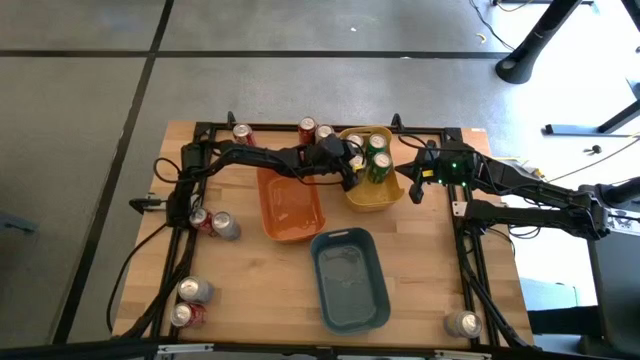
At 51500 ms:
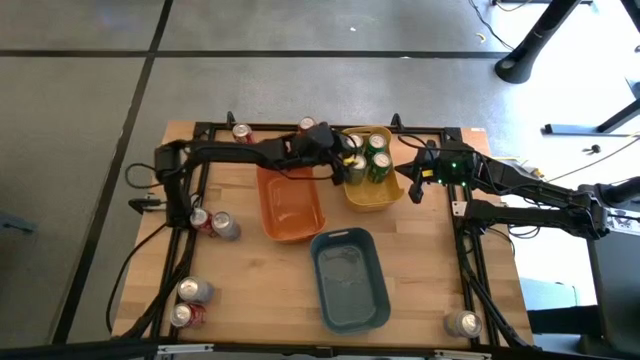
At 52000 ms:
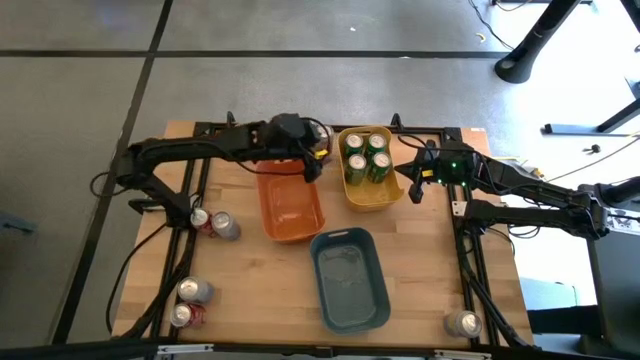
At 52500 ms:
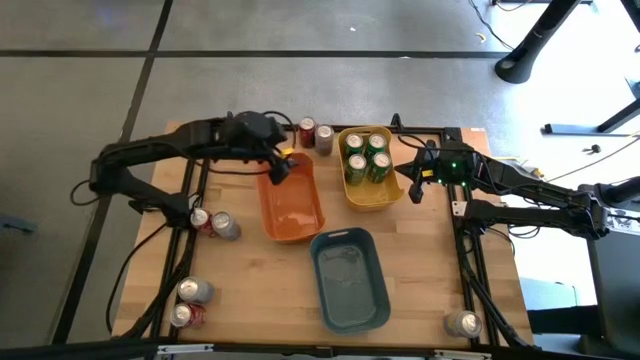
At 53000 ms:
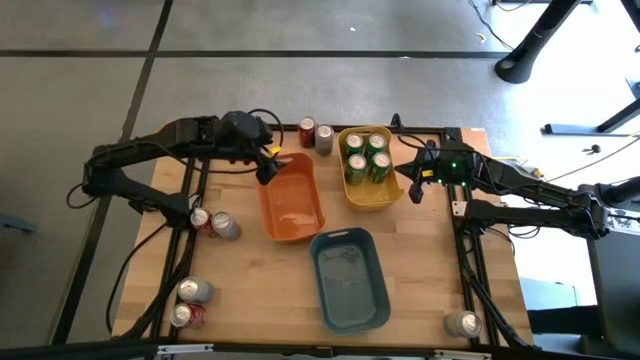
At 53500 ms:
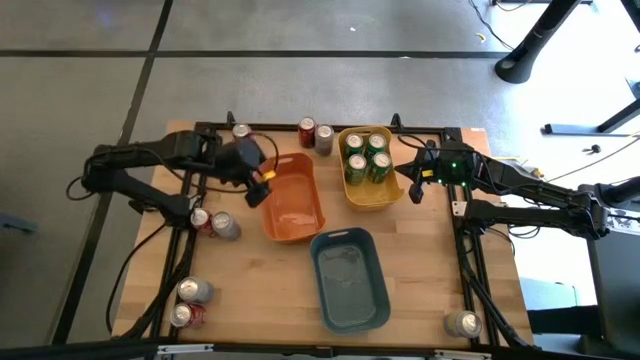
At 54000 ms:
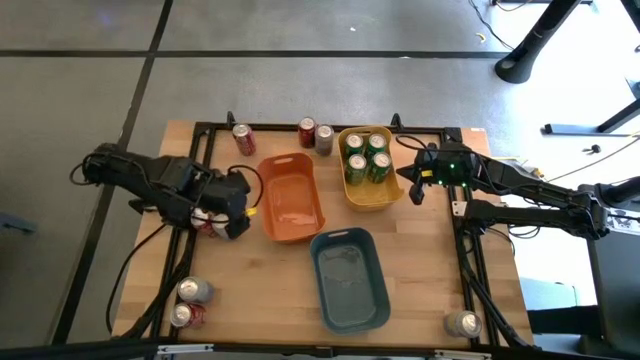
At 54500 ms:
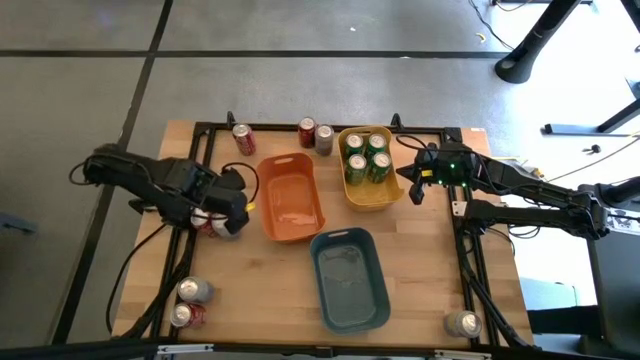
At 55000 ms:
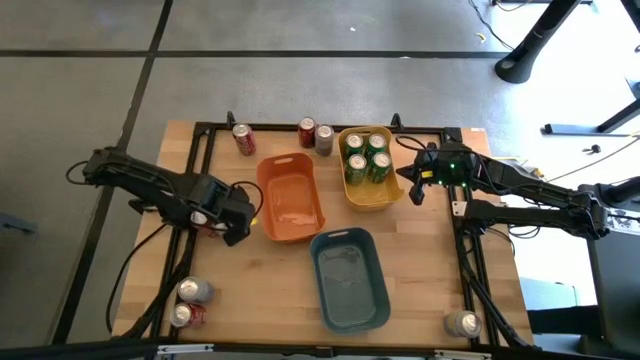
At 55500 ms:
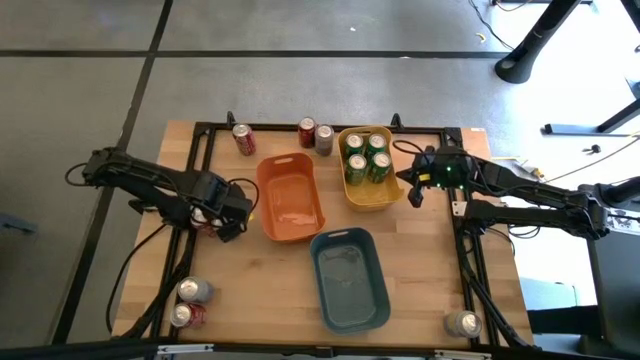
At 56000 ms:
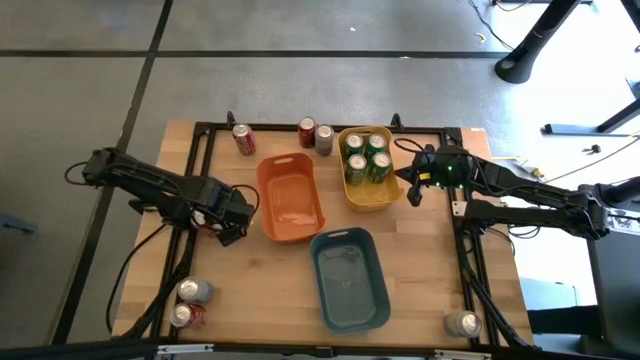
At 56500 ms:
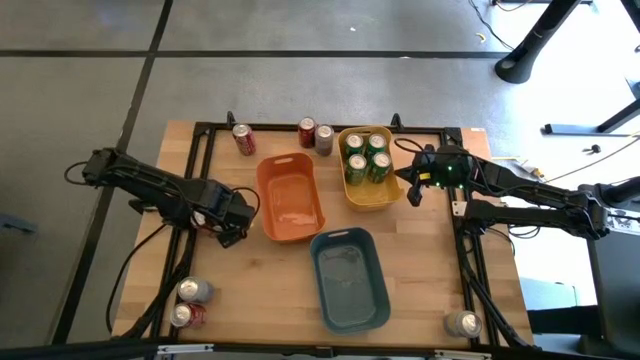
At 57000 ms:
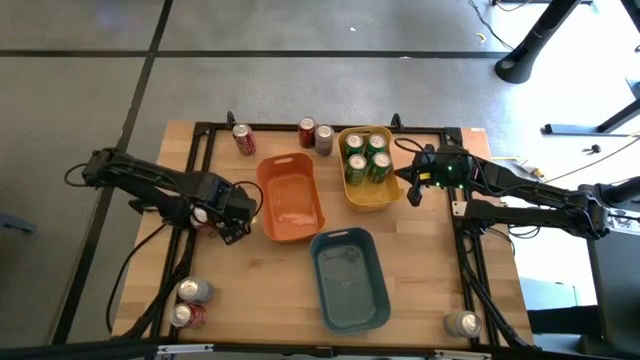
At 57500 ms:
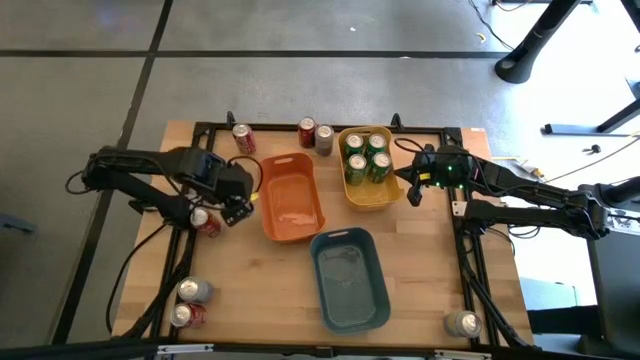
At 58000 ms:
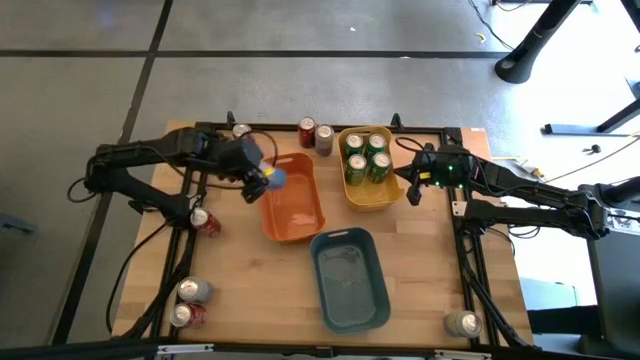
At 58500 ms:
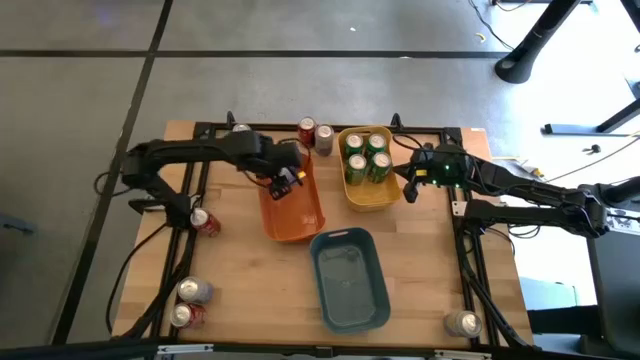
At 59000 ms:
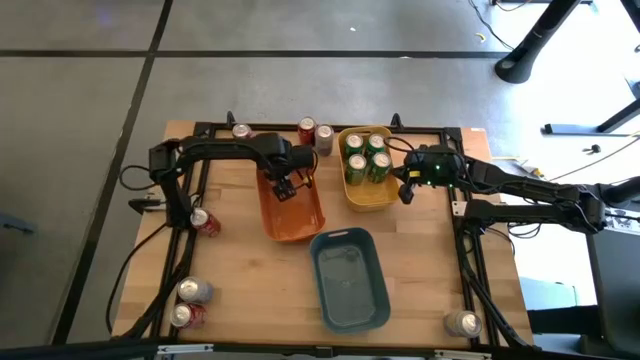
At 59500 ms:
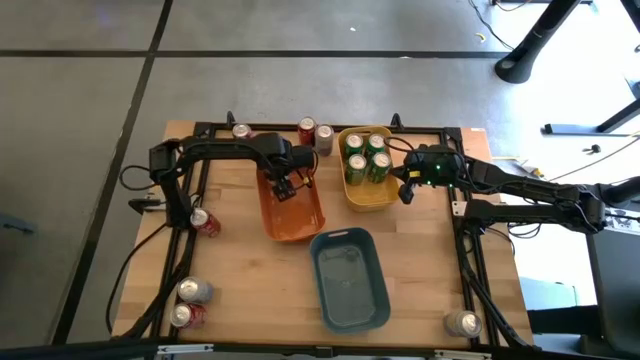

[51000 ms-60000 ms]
Task: Sort soda cans
Put the white soda can into the orange bin

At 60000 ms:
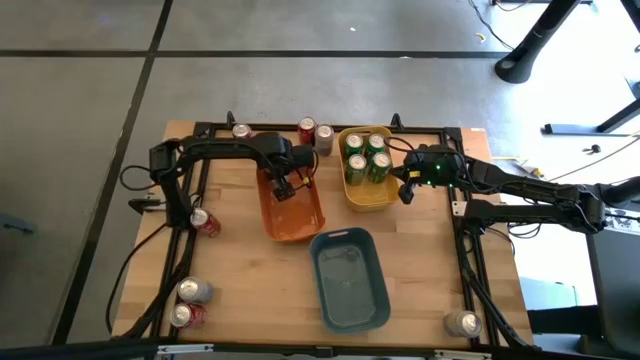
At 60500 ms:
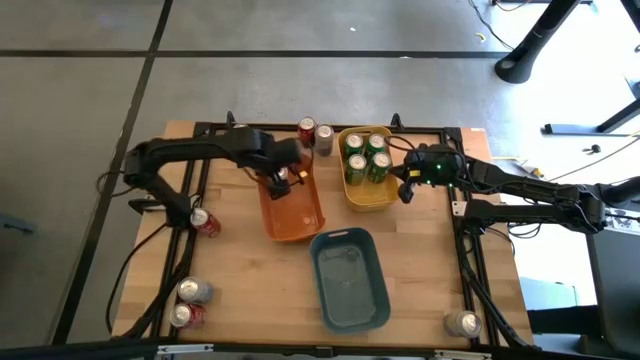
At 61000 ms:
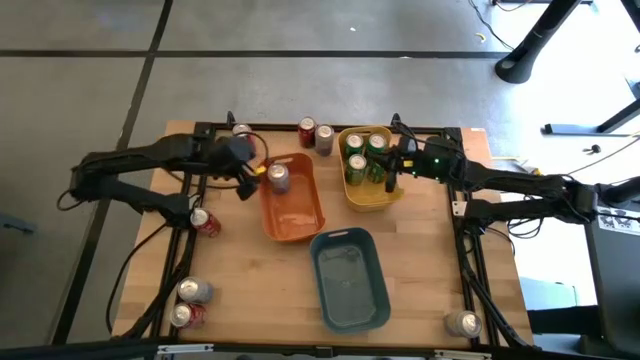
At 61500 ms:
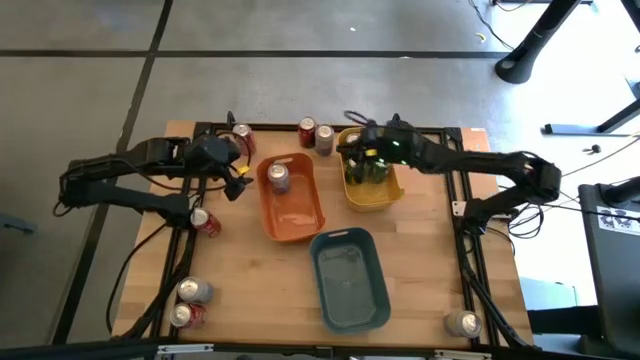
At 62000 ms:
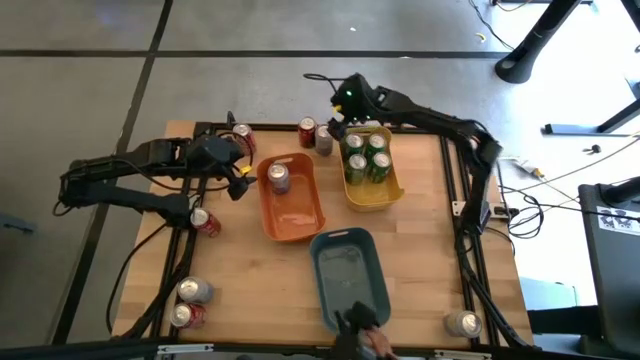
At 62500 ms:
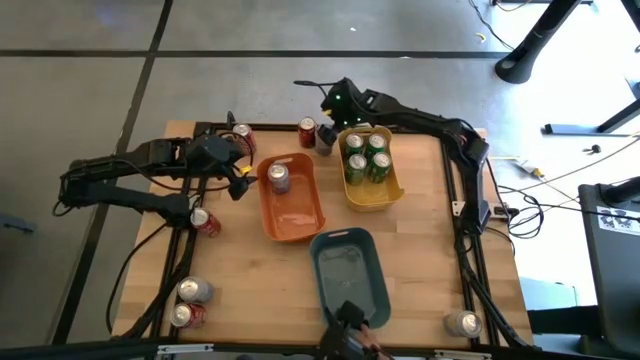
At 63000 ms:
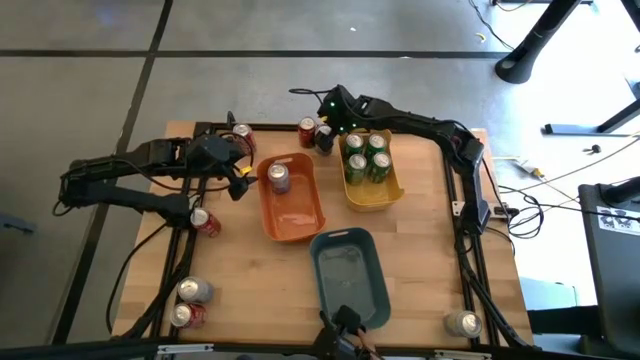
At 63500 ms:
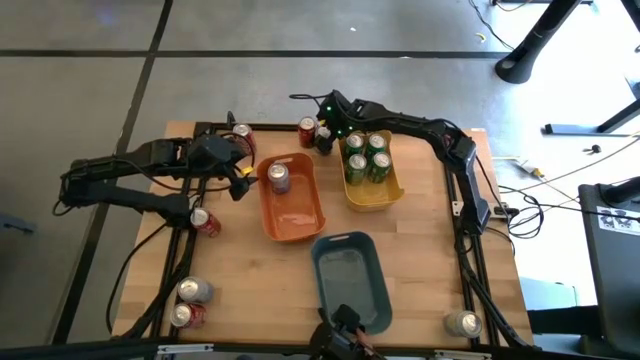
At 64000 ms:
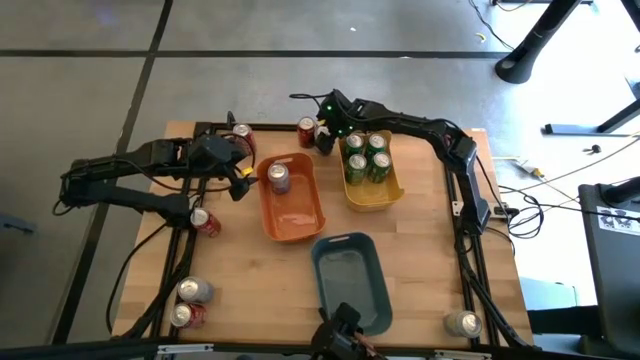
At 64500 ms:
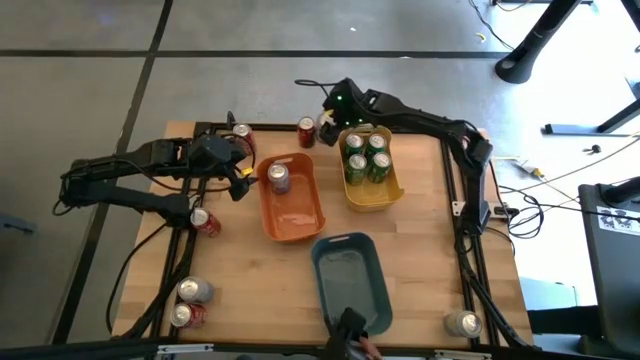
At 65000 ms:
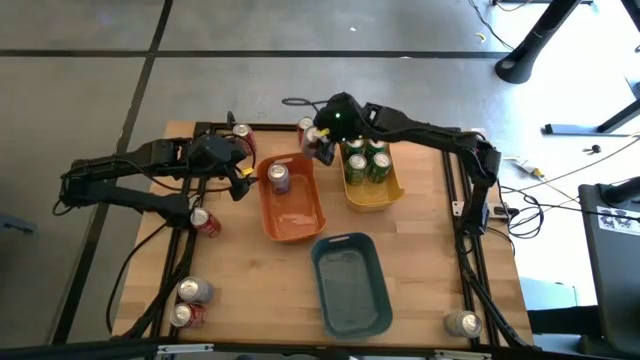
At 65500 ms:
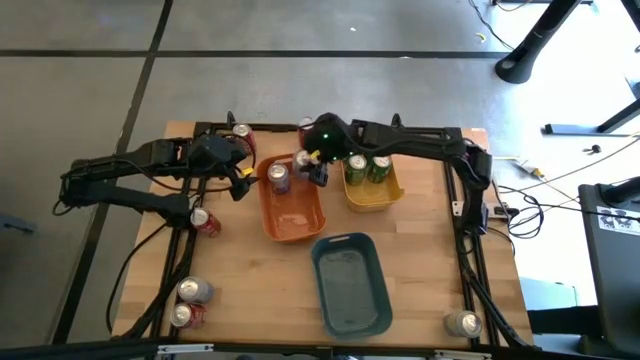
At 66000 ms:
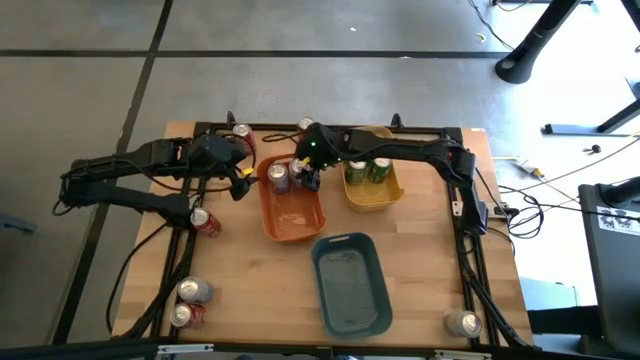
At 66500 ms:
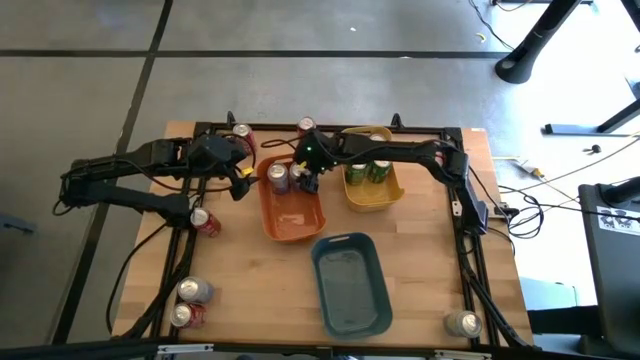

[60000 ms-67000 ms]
Put the white soda can into the orange bin

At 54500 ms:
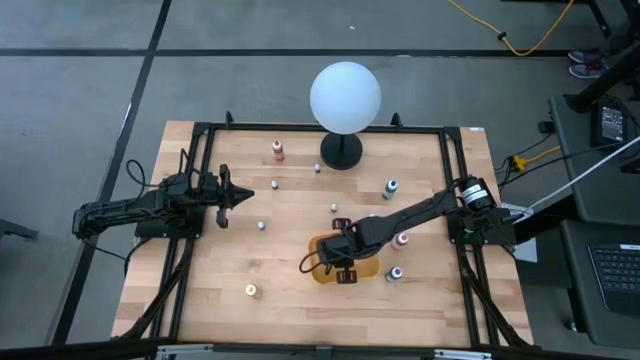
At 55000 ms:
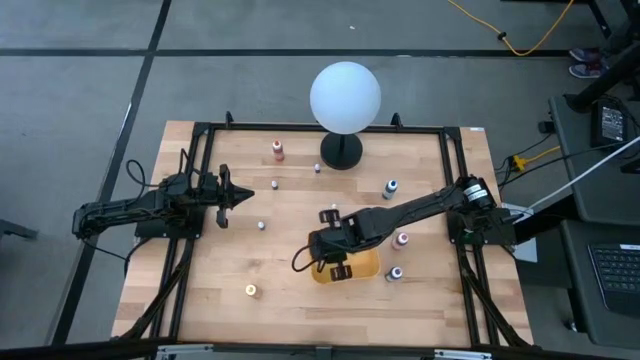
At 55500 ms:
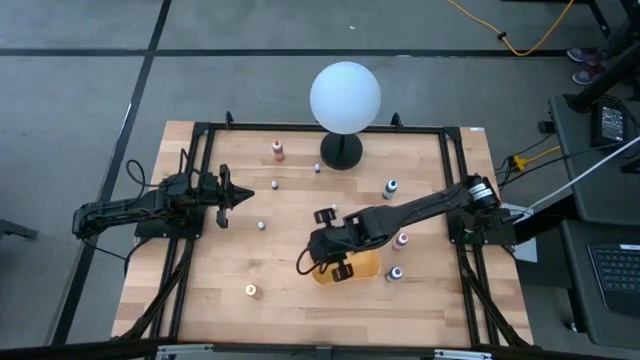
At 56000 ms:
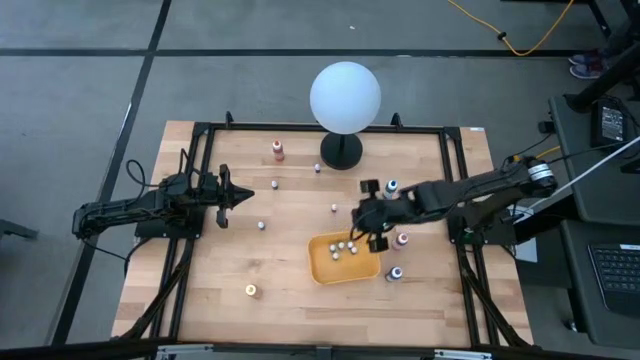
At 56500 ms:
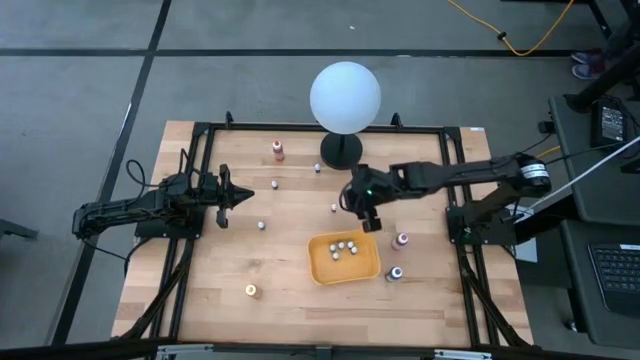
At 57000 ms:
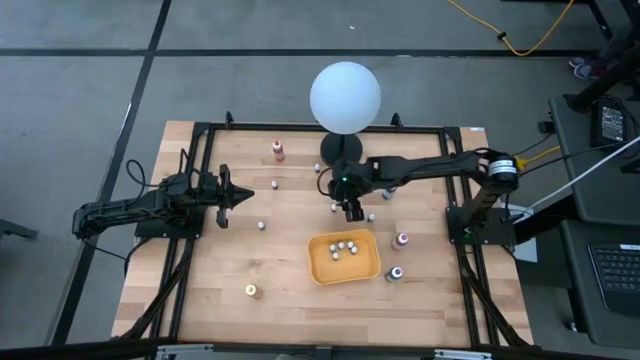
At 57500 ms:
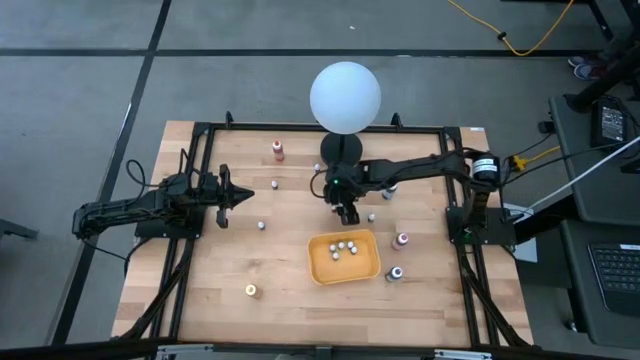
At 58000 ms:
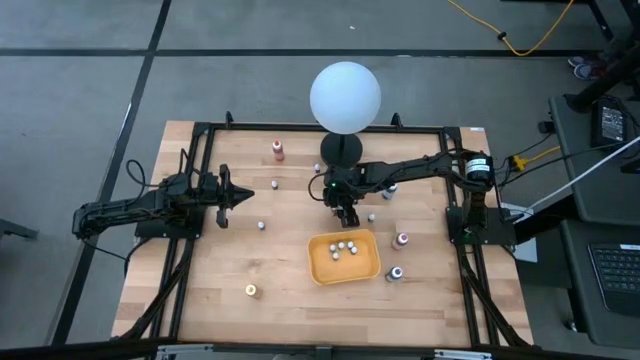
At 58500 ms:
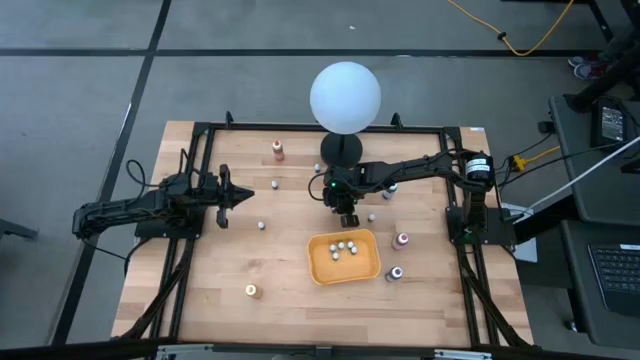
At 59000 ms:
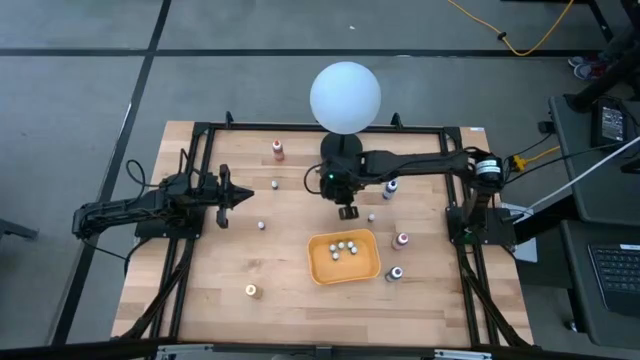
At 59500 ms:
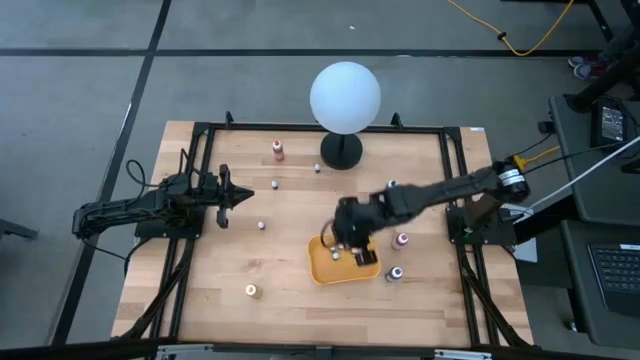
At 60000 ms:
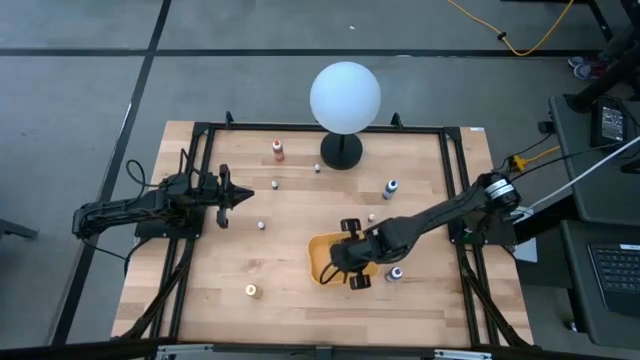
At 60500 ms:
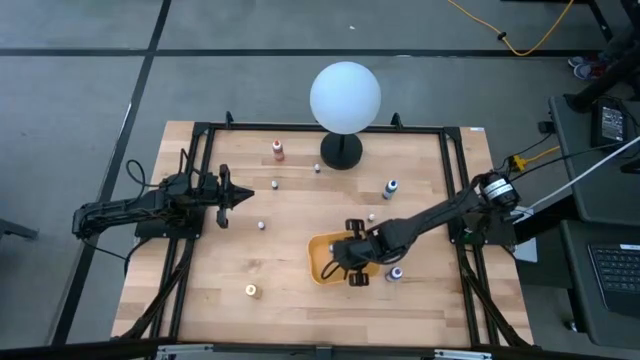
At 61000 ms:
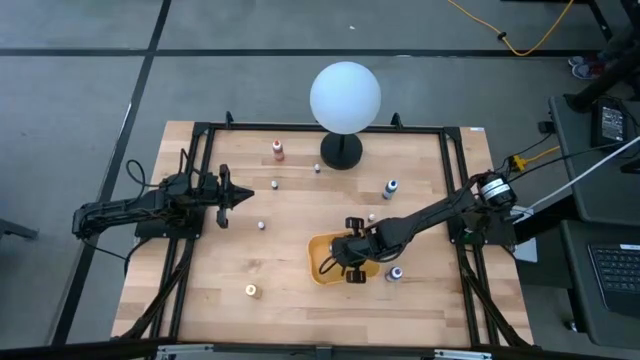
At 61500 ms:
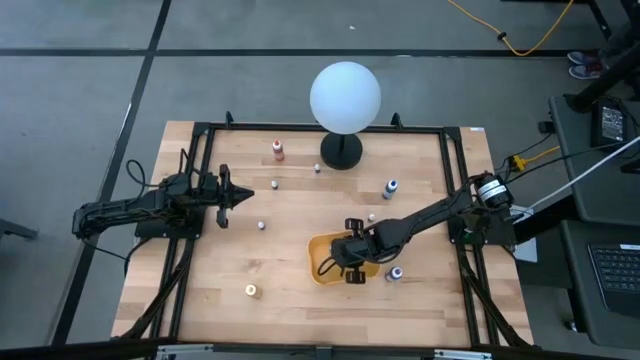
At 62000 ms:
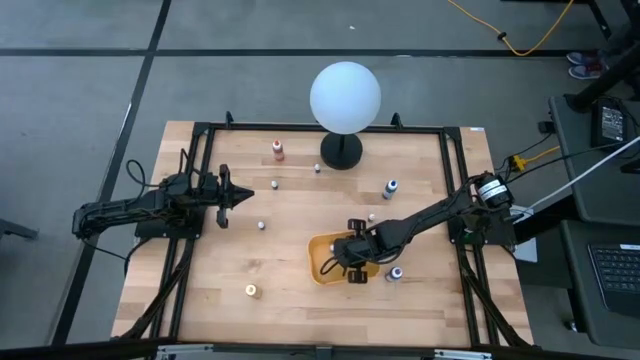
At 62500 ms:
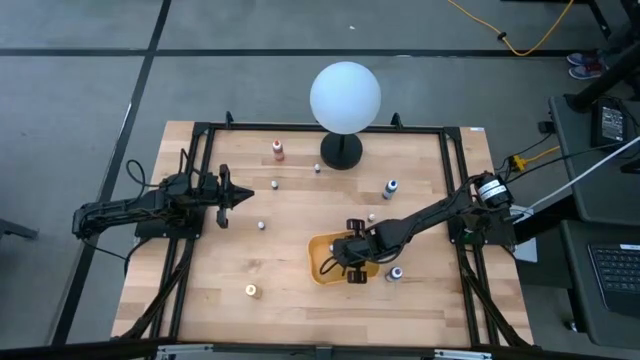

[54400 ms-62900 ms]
Task: Pick & Place food coloring
Put the small red food coloring bottle into the yellow bin
